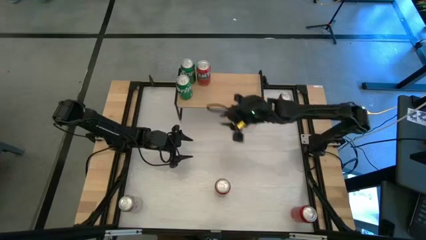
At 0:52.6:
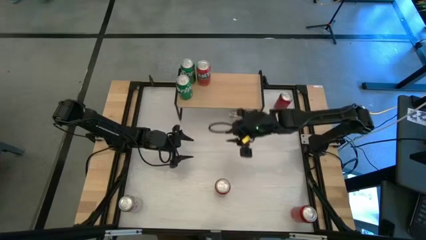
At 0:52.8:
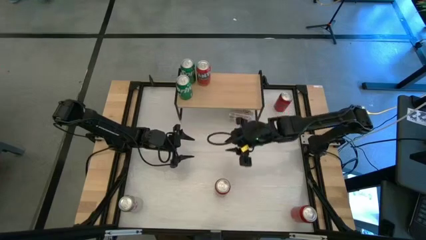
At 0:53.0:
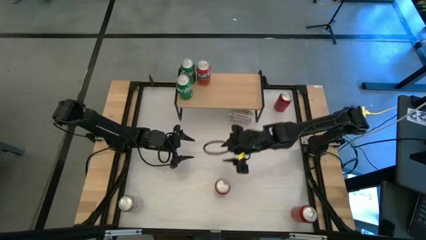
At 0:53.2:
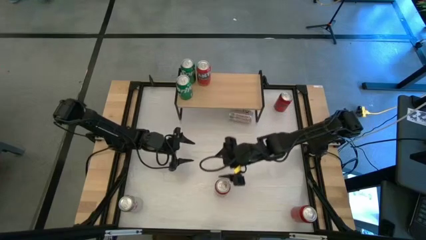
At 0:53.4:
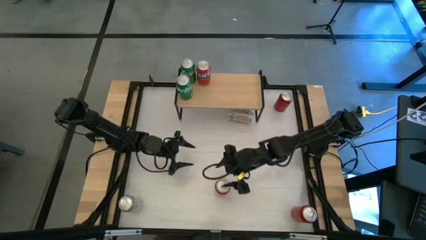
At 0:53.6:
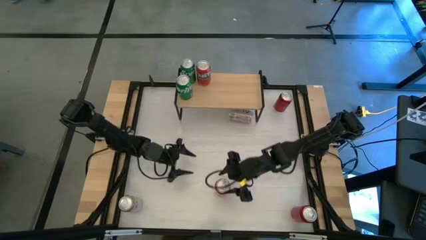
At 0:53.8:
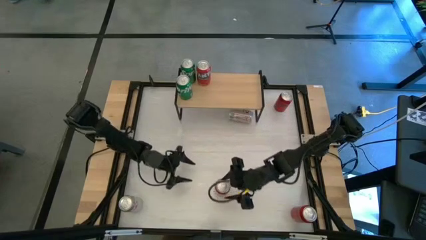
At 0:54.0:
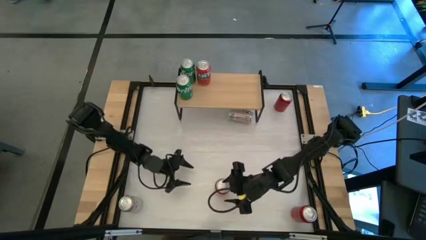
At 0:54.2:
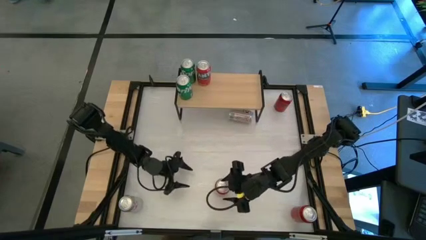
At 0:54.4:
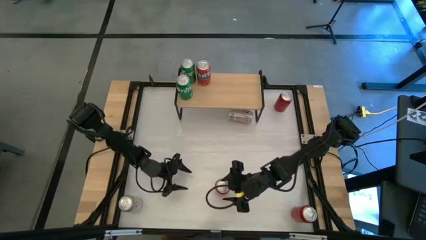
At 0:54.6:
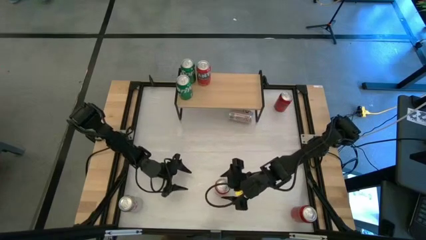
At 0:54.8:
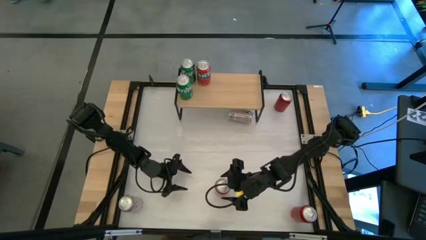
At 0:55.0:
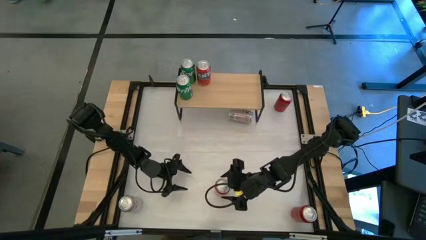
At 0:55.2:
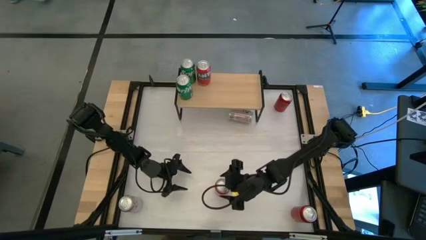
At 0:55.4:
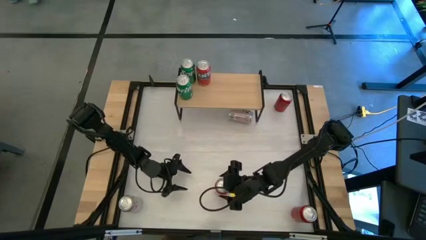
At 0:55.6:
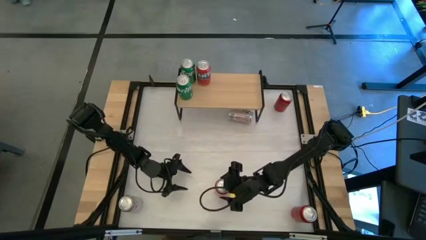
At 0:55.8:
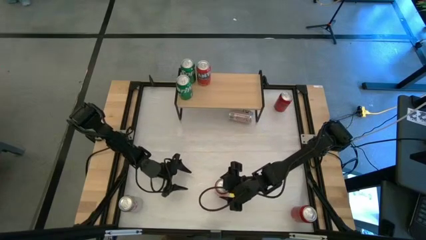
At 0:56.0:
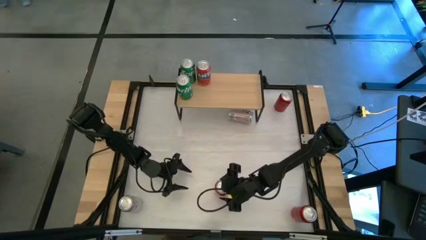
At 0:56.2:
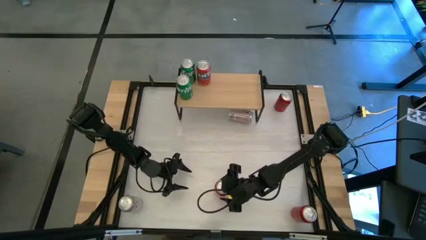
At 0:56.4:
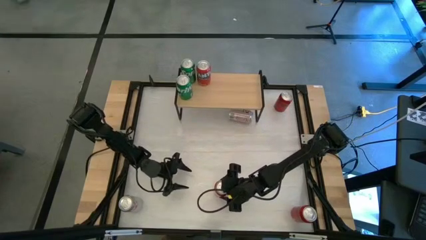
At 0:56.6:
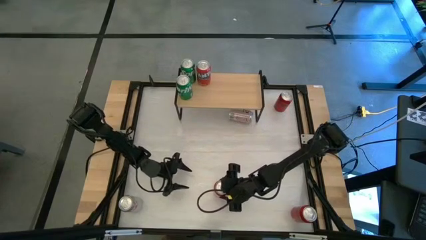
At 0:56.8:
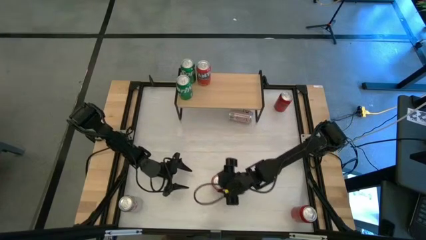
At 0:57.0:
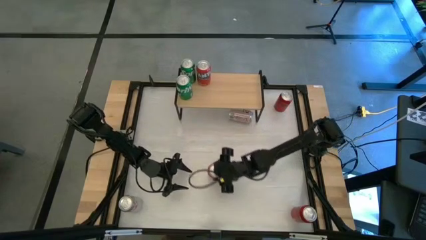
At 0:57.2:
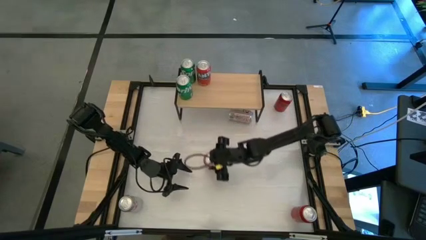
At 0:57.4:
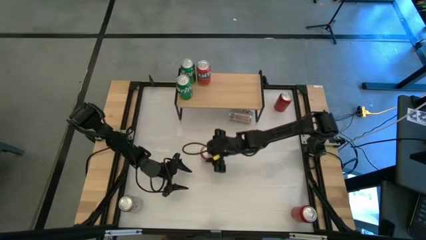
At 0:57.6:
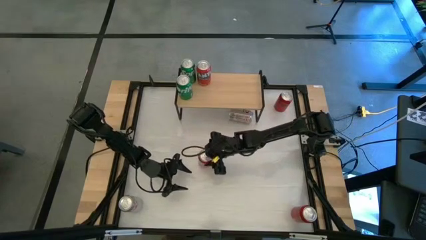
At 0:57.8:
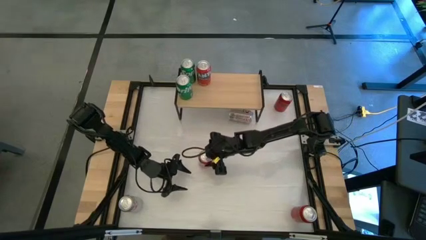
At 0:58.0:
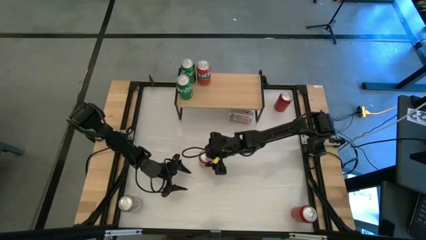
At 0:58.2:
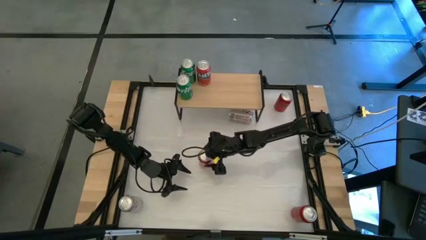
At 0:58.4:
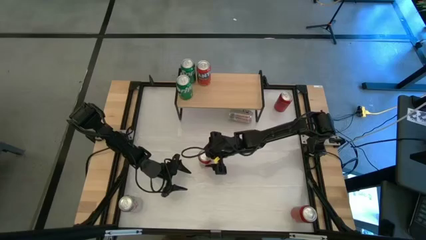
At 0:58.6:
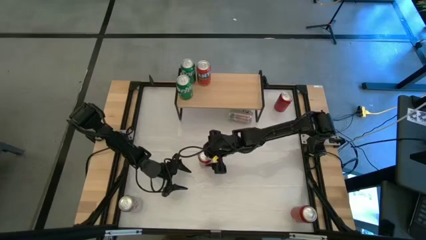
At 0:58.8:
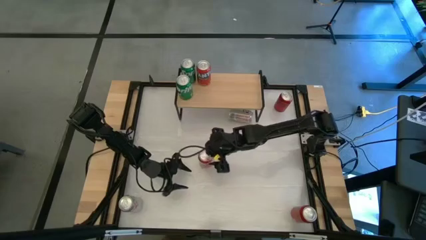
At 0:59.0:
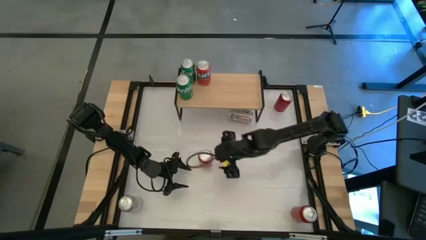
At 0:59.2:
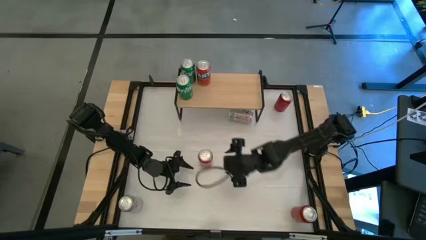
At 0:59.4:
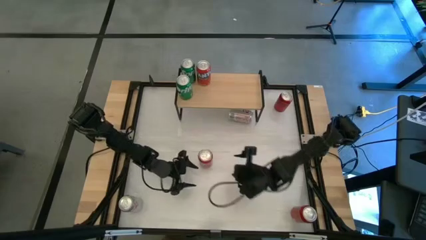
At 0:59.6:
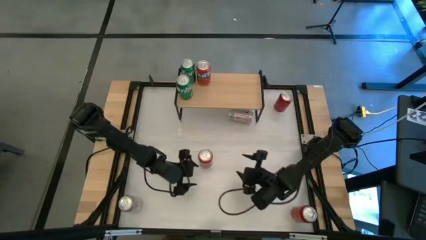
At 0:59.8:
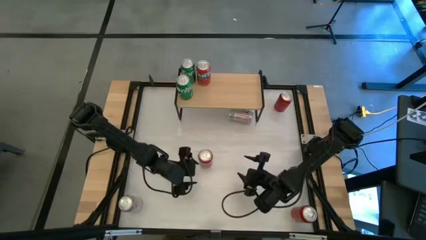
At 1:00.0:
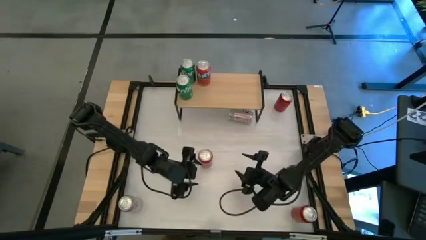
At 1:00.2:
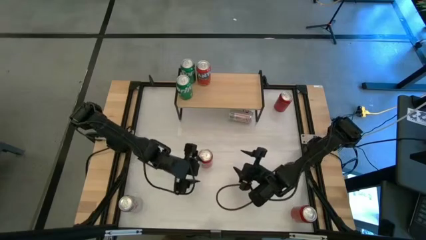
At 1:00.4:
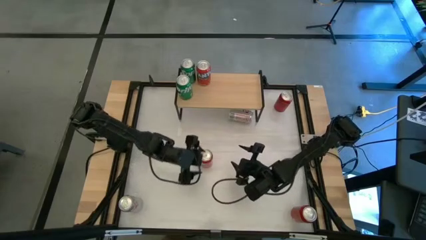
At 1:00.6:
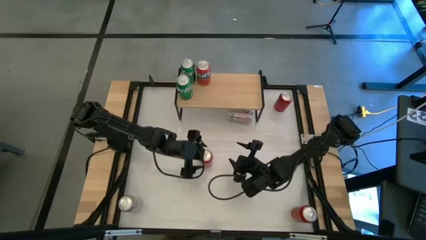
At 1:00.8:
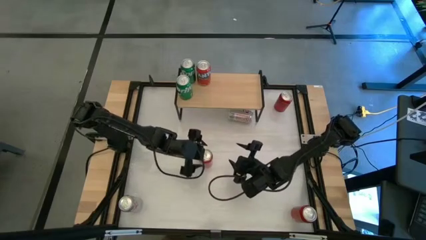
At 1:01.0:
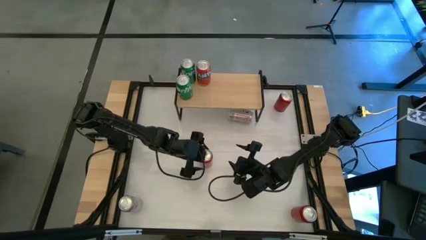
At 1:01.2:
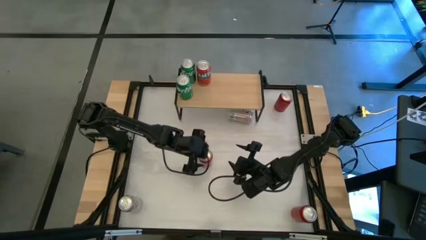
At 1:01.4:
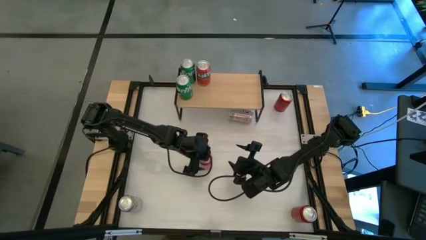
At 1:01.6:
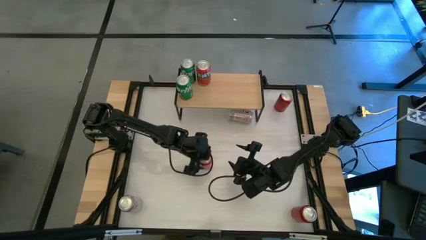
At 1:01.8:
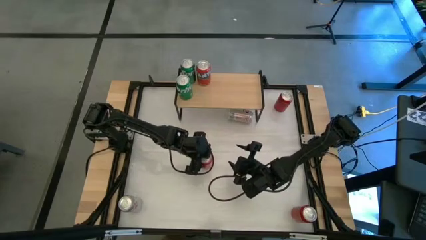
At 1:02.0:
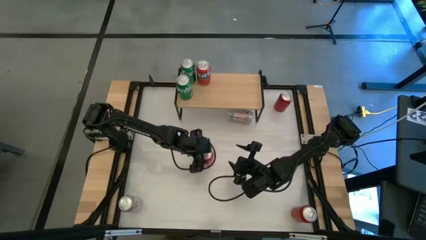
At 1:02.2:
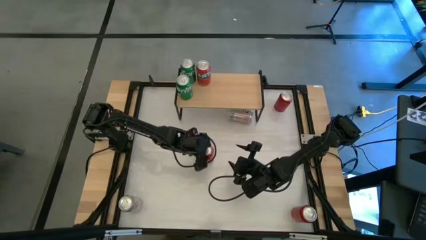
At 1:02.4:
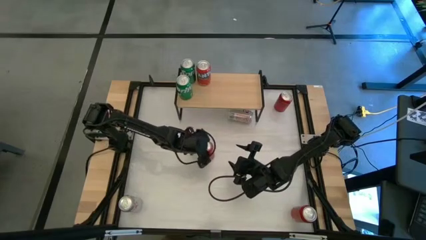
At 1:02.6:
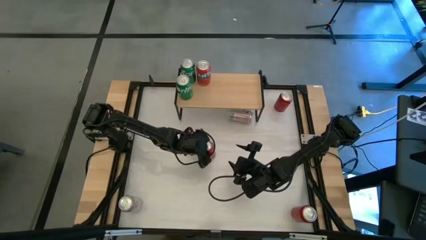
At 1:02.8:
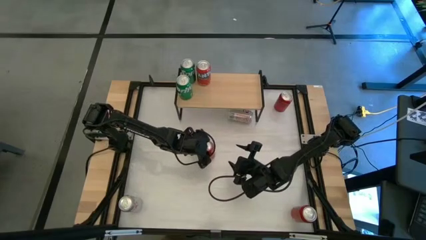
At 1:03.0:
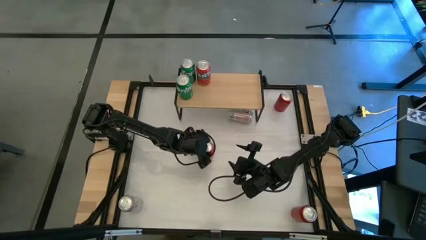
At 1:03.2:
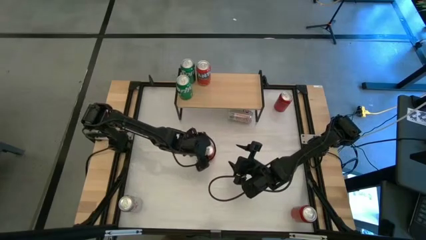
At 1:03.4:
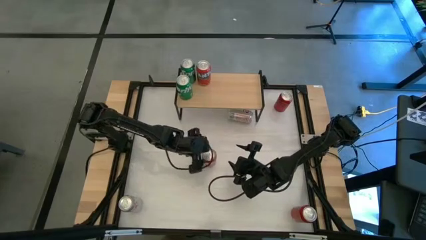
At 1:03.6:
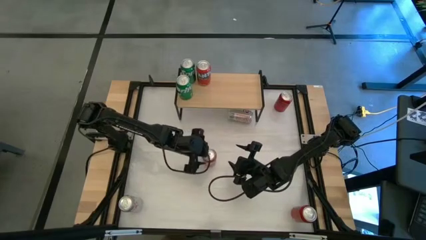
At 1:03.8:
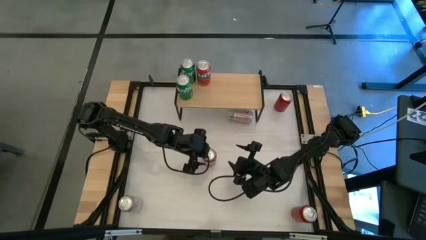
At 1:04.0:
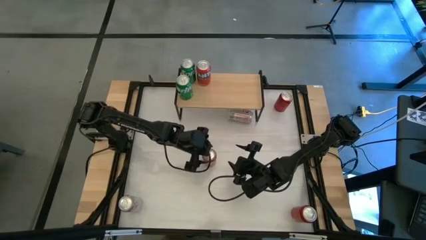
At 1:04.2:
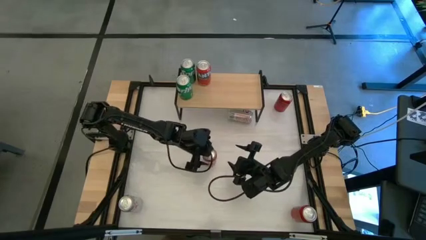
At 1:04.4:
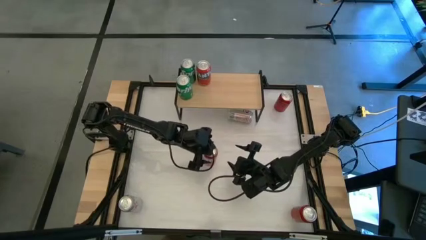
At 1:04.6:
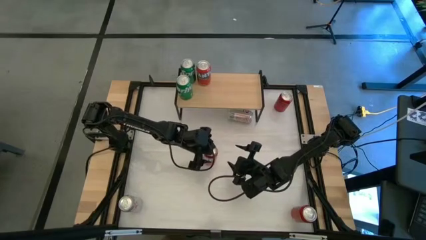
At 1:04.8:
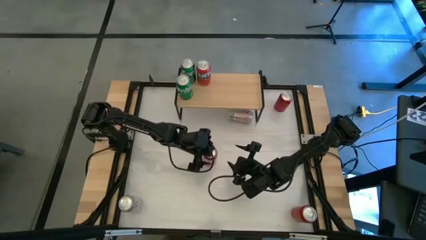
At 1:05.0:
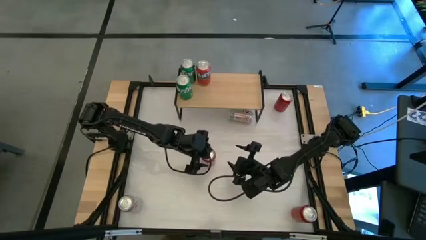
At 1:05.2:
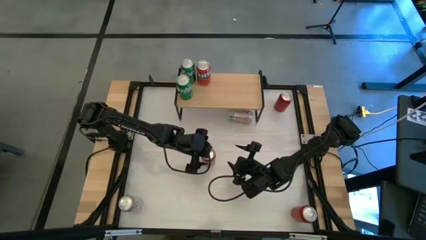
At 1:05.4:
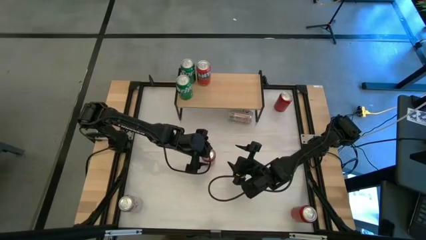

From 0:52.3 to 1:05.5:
Task: Place canned beverage on shelf
Put the orange soda can on the shelf aligned with the other orange soda can

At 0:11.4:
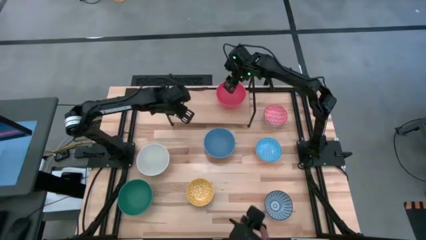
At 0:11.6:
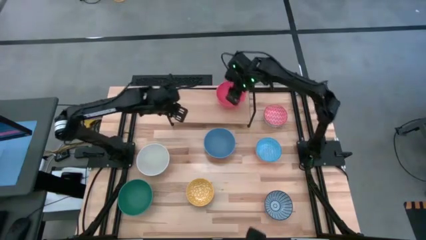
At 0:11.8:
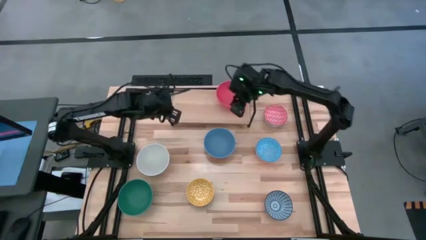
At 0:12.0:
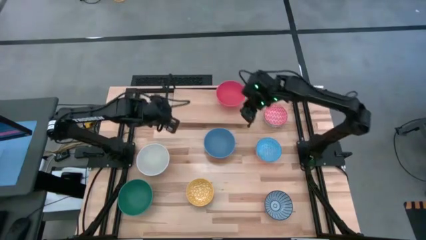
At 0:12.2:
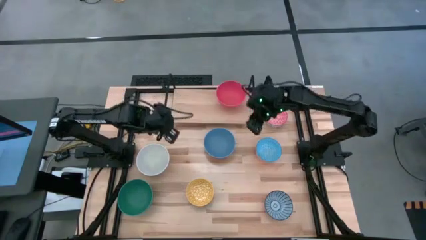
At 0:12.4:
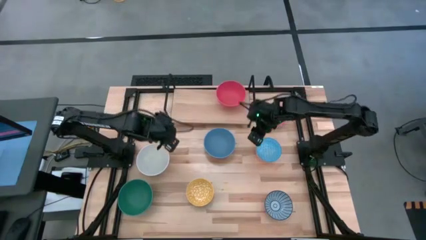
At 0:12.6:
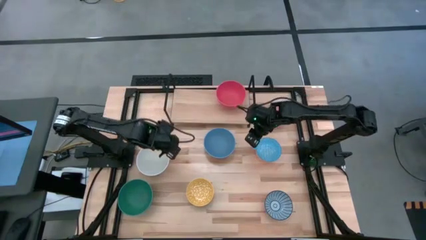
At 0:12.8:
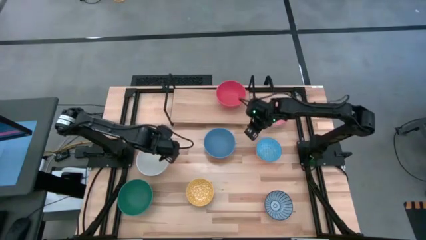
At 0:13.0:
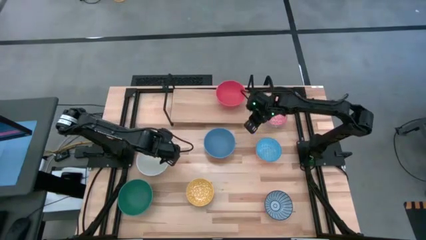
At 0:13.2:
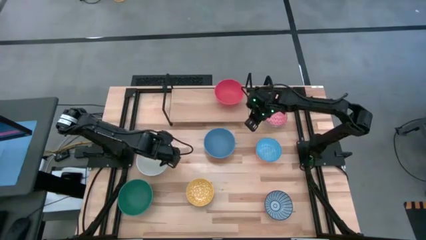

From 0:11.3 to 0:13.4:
Task: Place and stack bowls onto a shelf
Adjust the shelf
